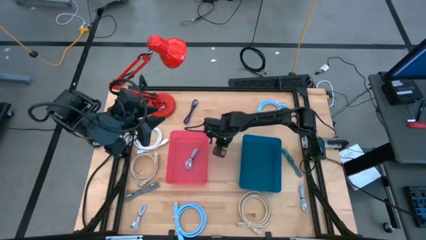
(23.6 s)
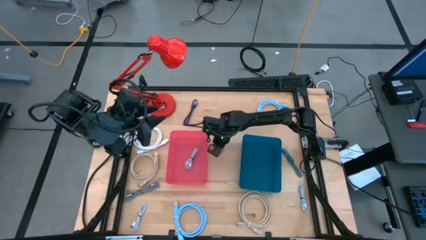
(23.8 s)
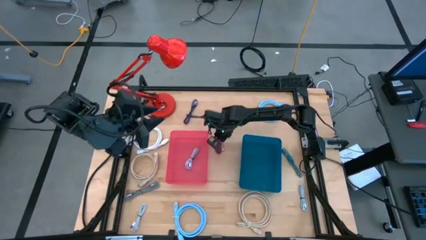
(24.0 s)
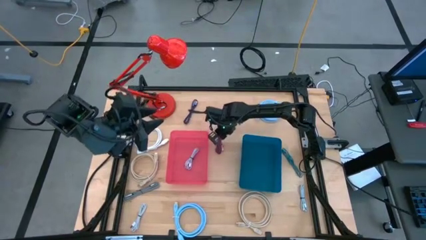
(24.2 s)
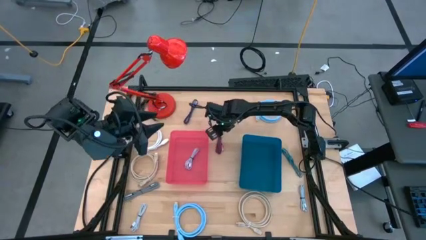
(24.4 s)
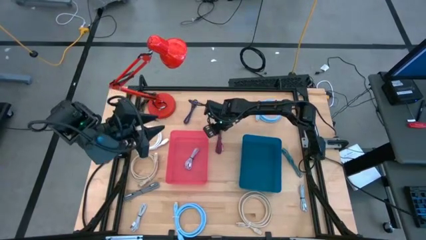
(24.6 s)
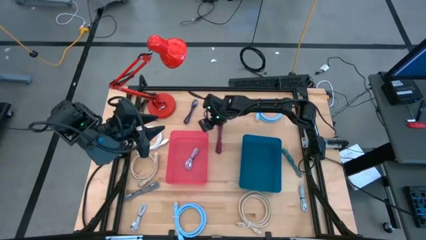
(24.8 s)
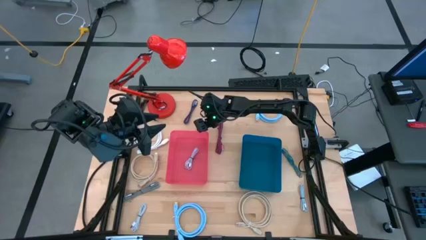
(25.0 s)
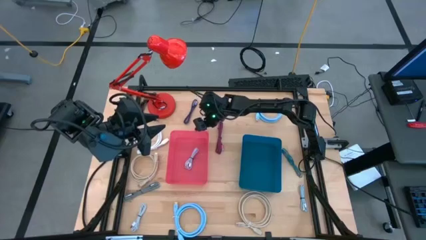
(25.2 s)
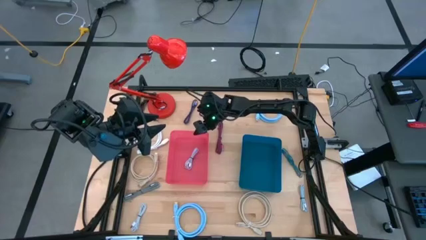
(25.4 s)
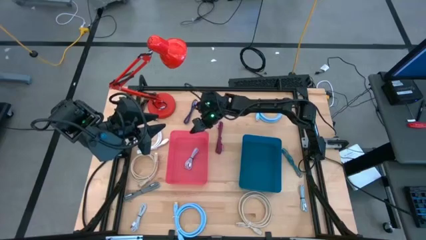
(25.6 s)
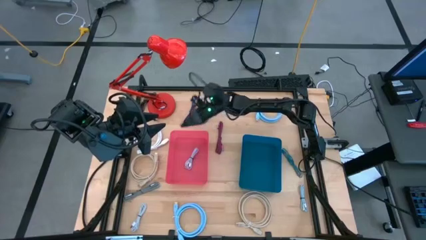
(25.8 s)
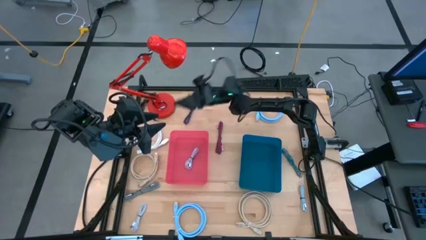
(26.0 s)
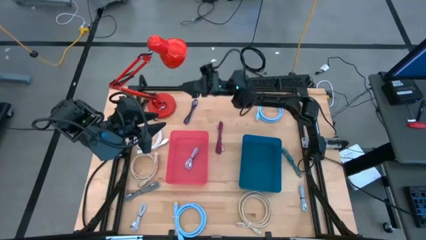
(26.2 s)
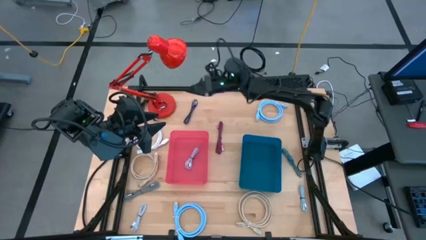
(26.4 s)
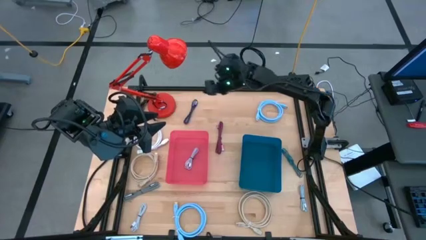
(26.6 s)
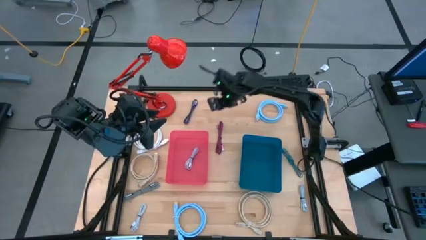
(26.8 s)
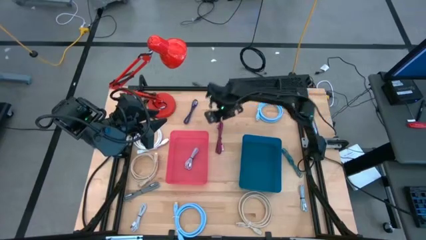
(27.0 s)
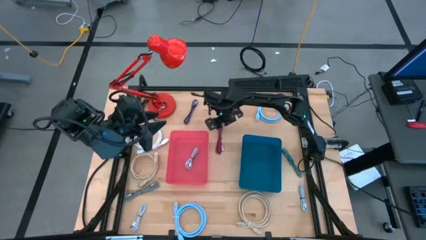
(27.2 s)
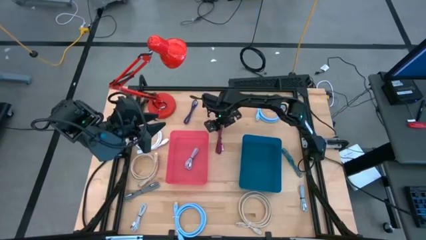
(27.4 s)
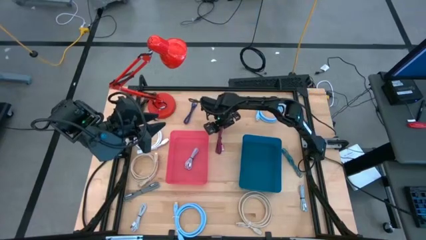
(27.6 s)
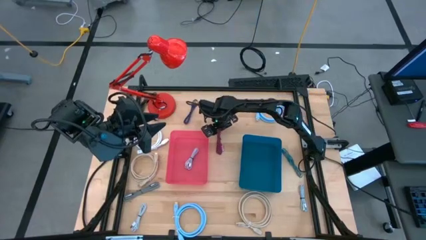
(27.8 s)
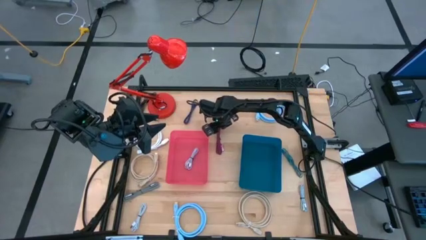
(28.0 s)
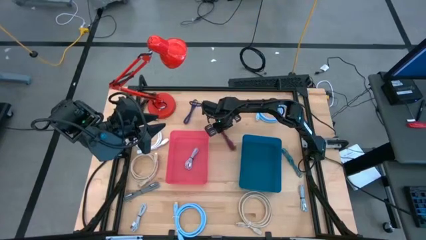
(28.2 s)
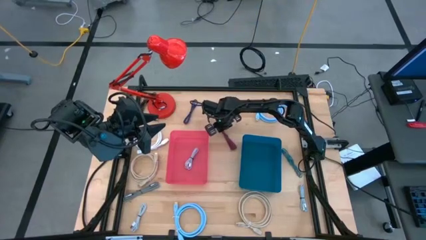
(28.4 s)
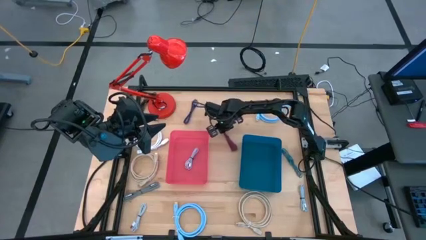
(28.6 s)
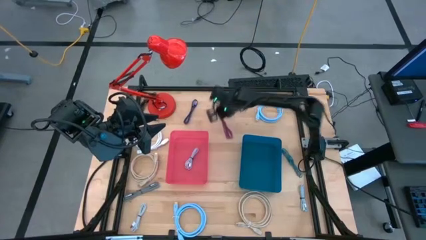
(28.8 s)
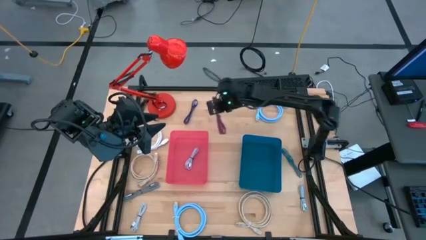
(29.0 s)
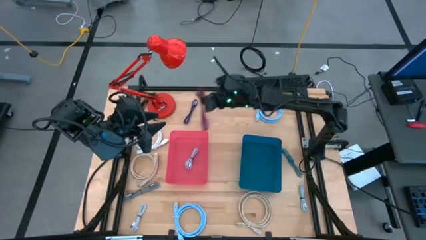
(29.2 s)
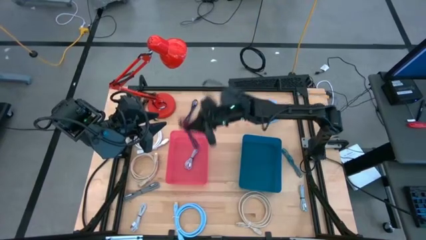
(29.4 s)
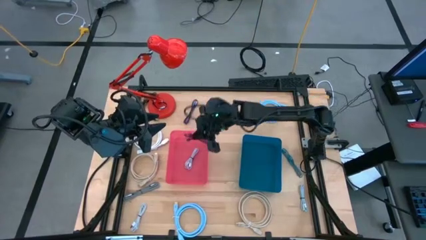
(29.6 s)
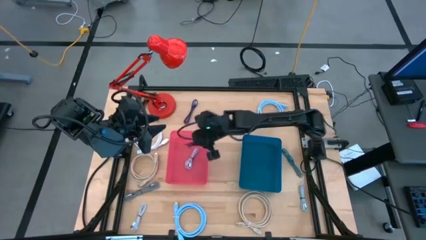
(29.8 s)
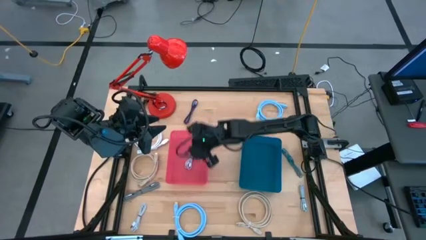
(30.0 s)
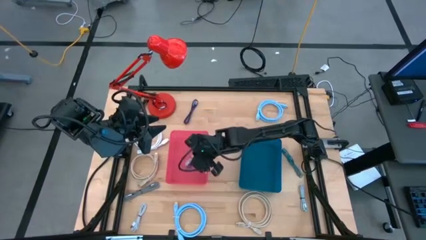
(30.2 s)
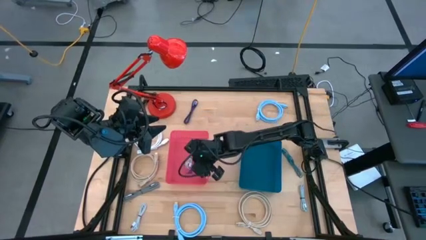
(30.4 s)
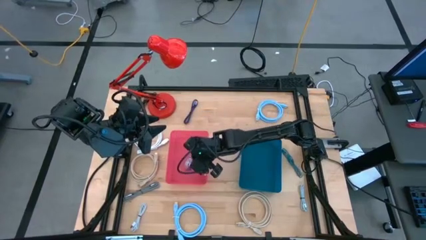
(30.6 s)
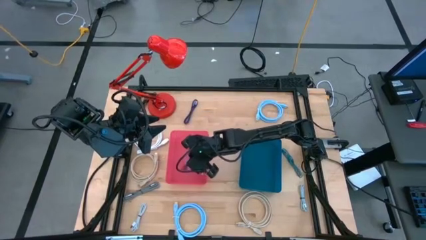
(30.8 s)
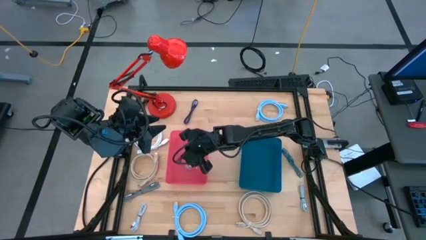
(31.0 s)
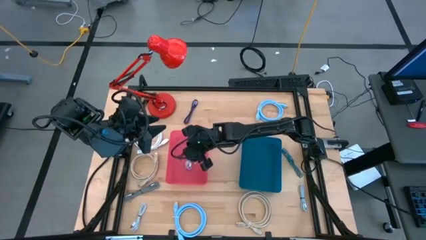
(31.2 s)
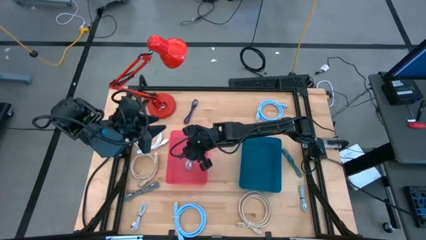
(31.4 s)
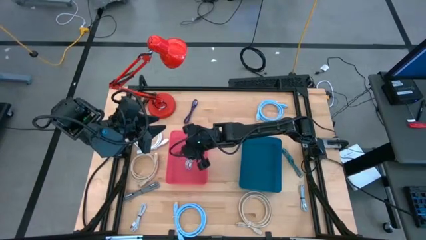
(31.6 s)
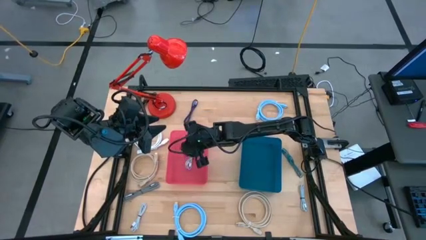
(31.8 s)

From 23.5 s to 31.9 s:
Task: Pick & Place USB Port
Put the black and pink charger cable into the red bin

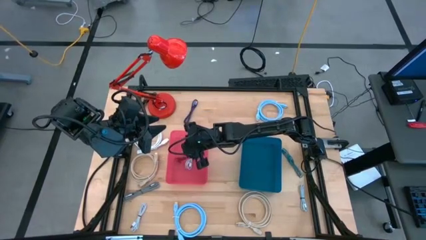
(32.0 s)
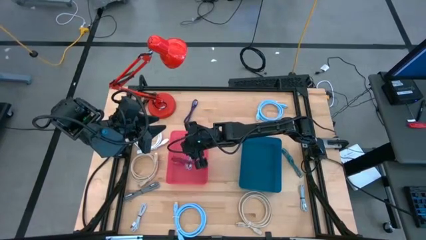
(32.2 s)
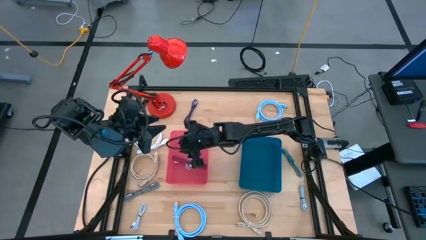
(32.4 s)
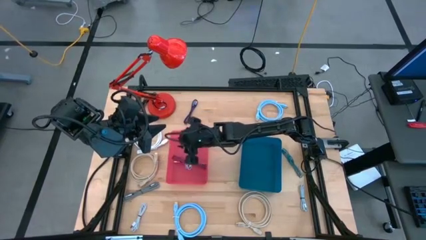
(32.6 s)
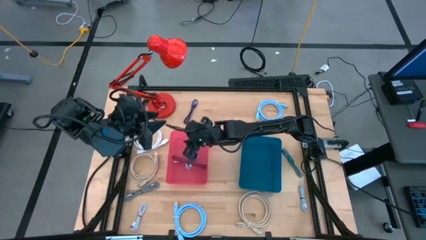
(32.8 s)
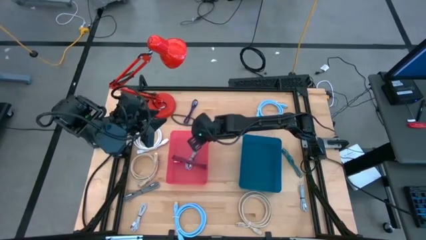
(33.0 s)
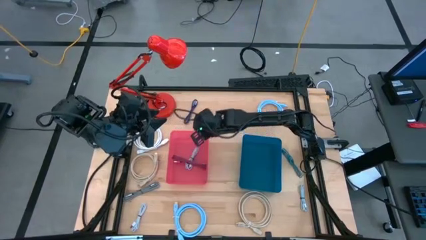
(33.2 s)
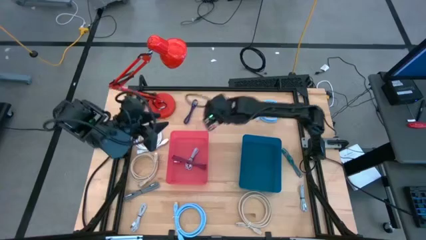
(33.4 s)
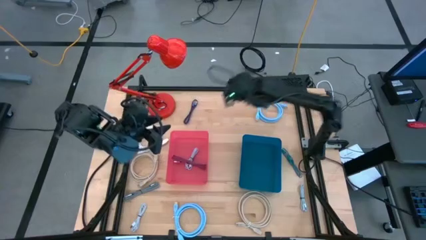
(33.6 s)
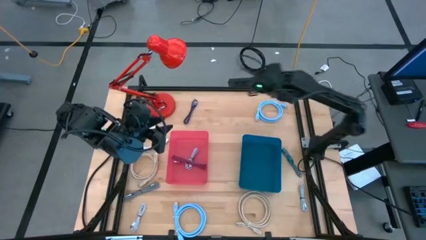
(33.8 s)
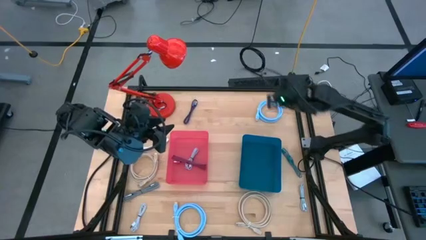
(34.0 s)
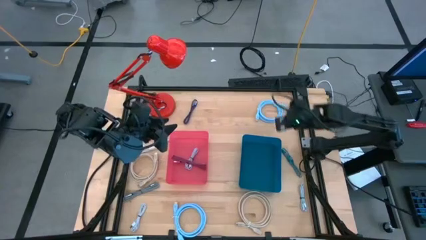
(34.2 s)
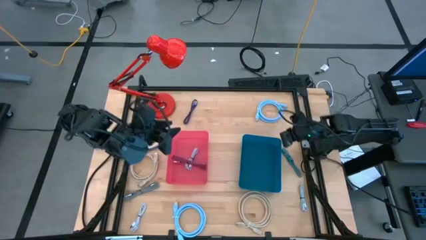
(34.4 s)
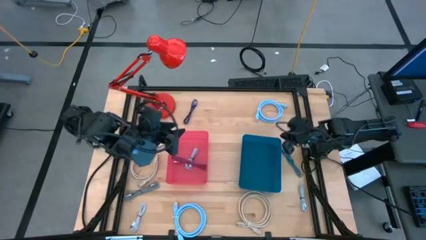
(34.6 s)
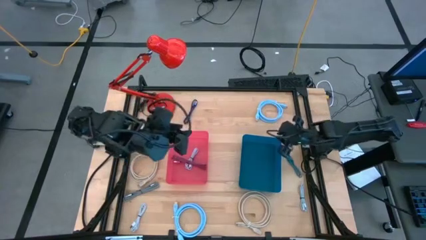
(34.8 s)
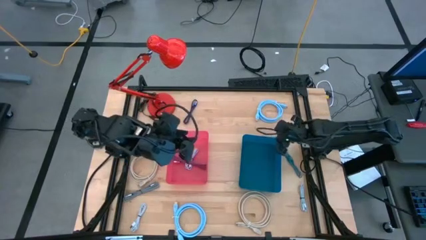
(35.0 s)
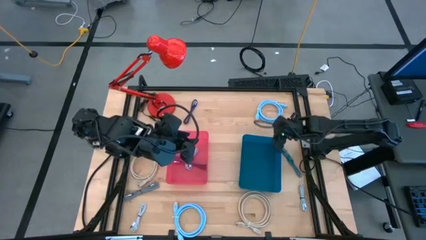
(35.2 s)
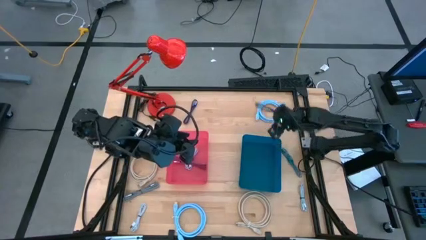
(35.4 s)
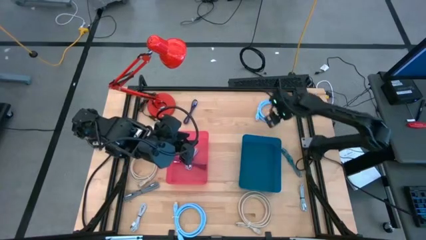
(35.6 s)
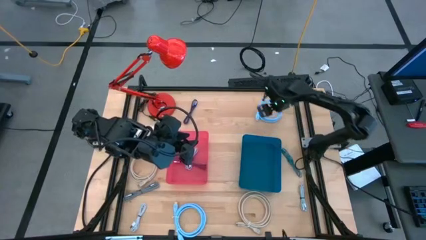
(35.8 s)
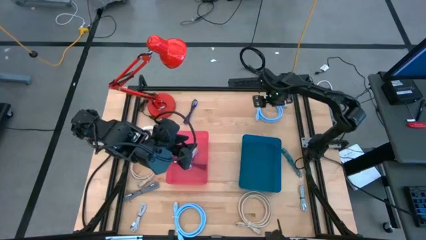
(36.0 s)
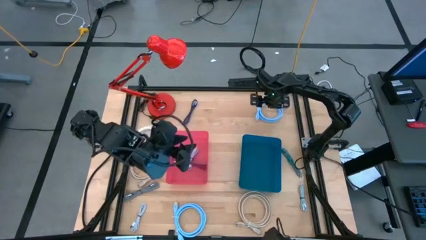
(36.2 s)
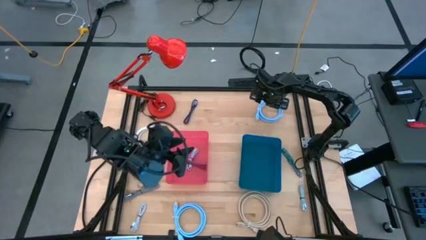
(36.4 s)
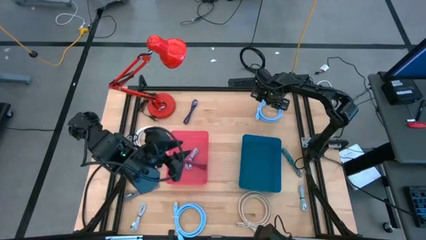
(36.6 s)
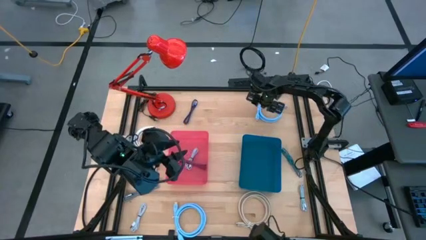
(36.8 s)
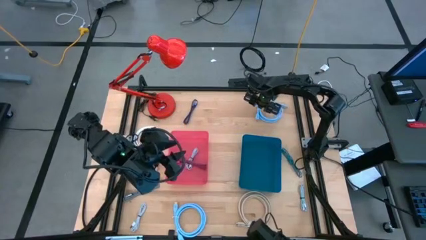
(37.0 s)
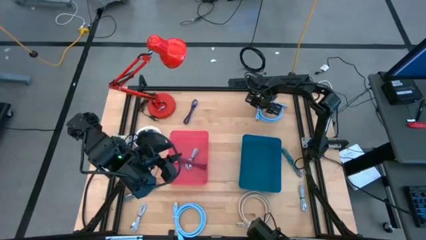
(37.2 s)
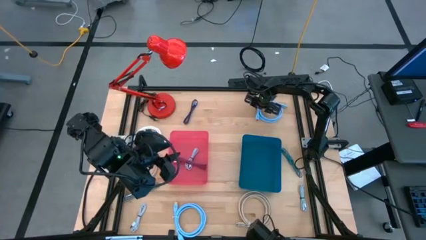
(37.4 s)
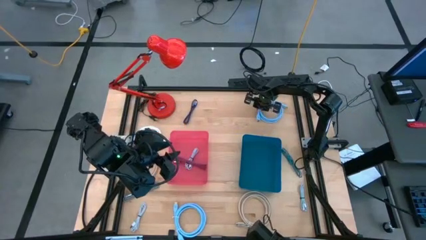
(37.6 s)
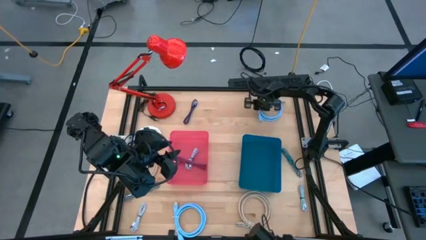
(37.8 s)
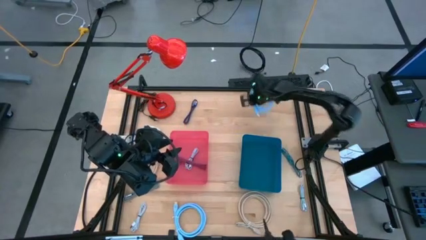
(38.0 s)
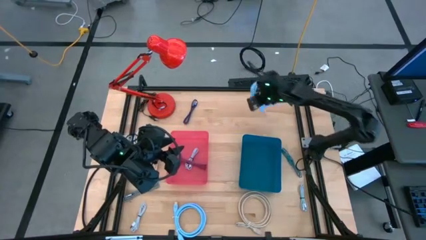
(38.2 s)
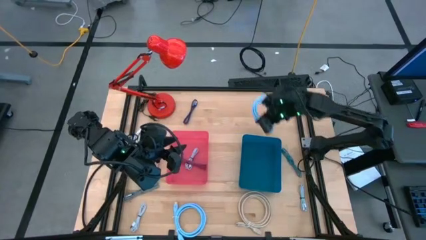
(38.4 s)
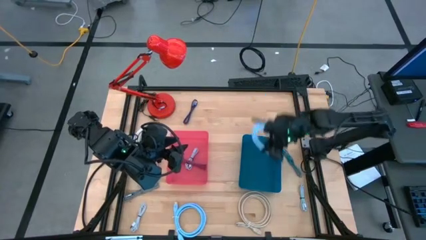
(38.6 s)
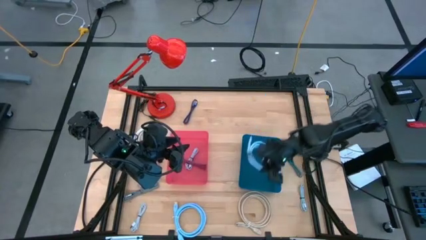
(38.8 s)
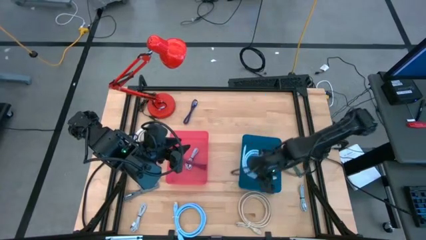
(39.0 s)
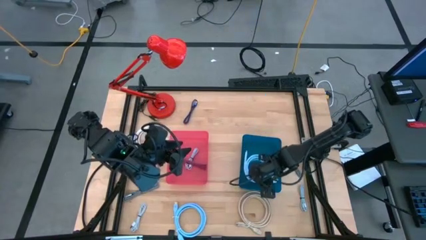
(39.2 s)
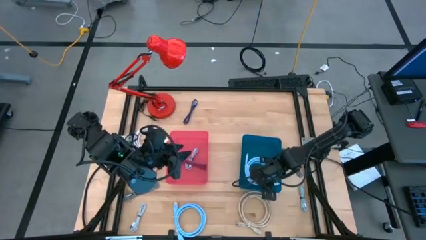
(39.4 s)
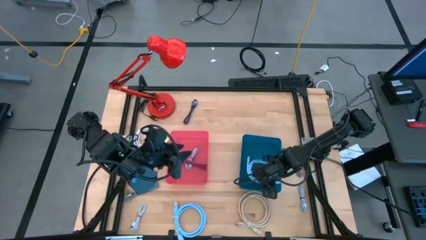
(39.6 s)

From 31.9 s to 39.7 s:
Put the top blue HDMI cable into the blue bin

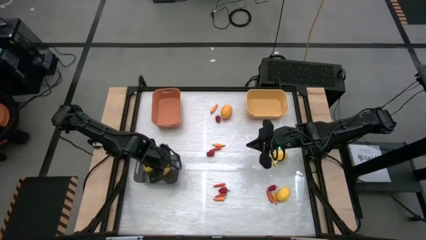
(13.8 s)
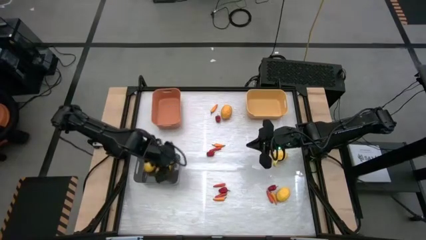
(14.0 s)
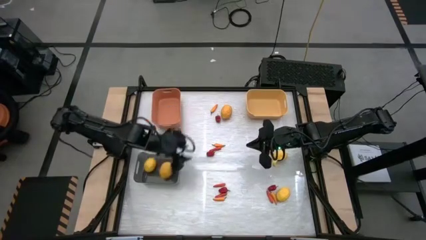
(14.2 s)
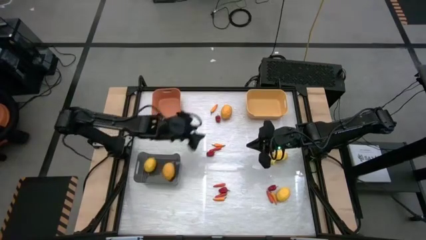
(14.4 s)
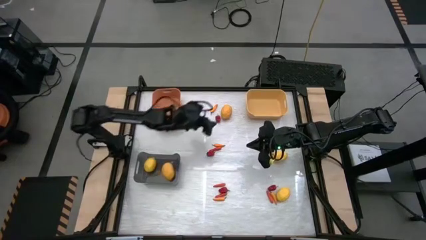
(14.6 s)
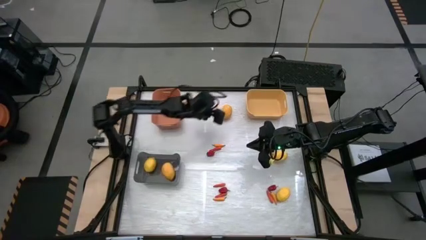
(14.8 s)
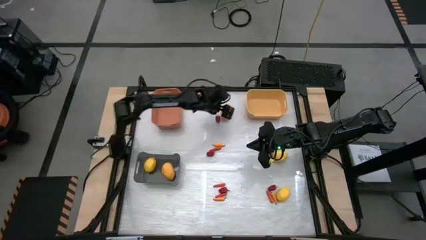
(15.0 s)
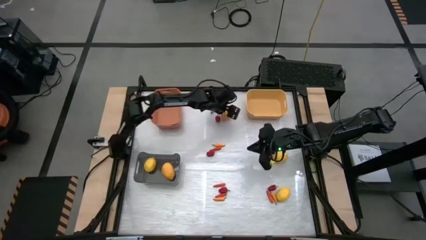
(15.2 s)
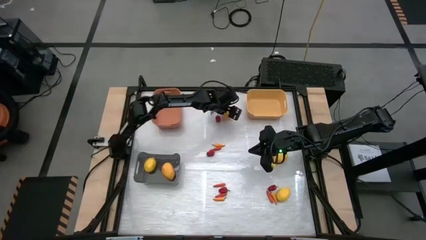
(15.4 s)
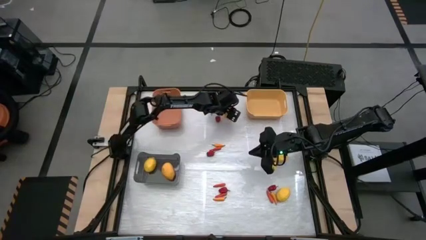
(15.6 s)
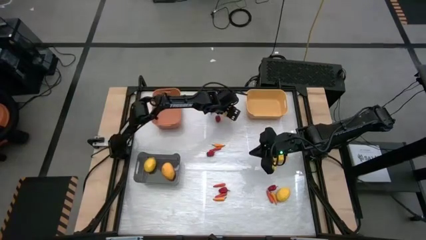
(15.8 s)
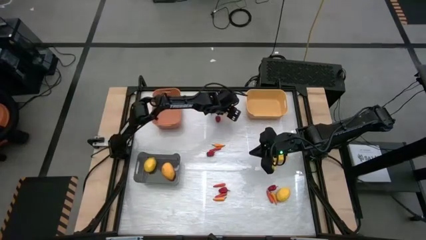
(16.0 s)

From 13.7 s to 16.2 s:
Task: Sort produce into baskets
Put the yellow lemon into the black bin
